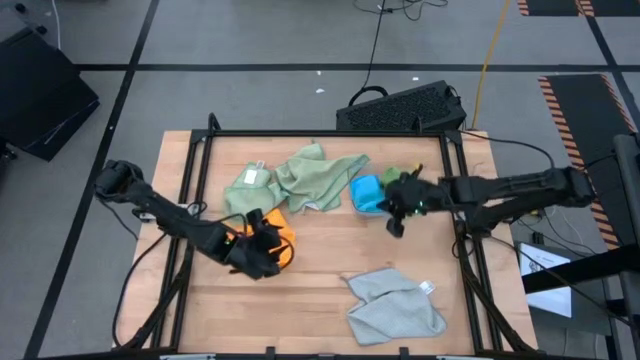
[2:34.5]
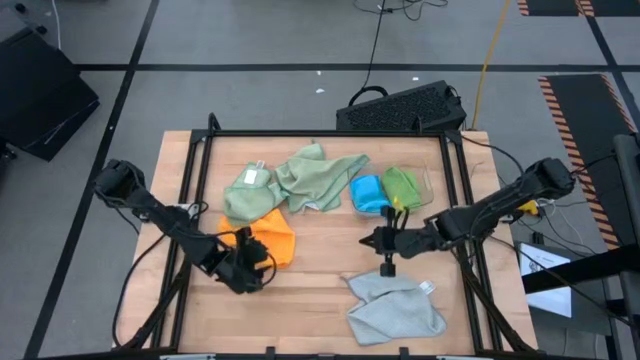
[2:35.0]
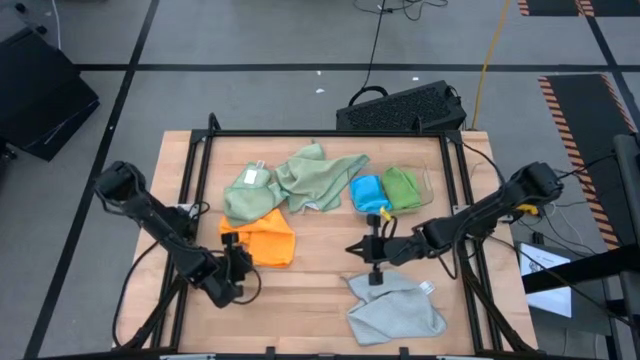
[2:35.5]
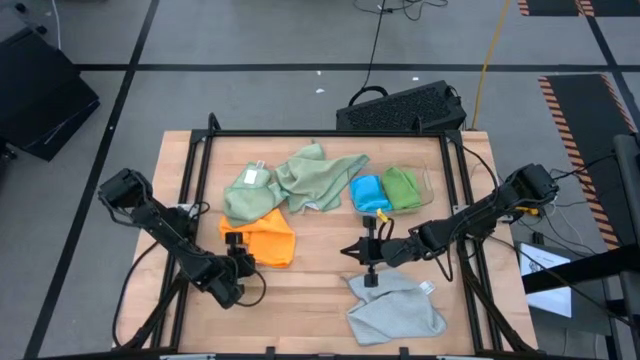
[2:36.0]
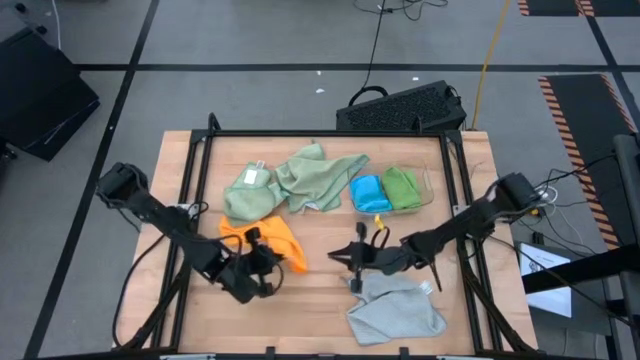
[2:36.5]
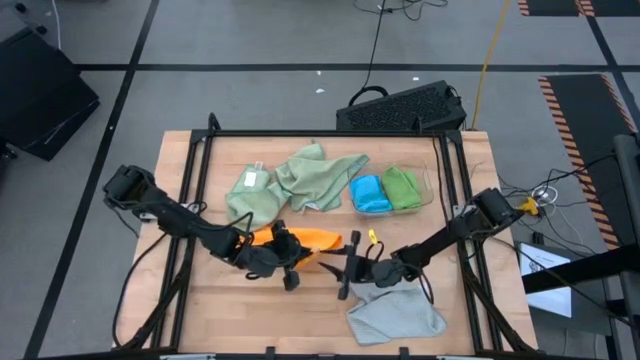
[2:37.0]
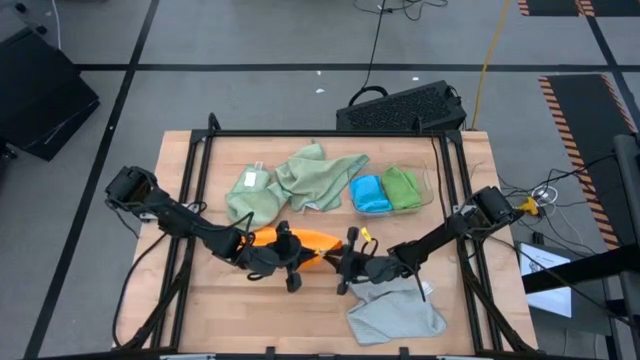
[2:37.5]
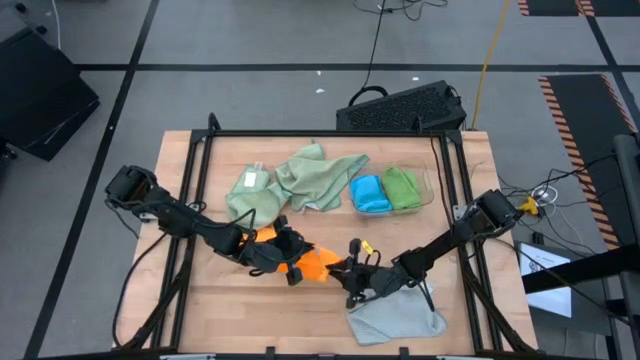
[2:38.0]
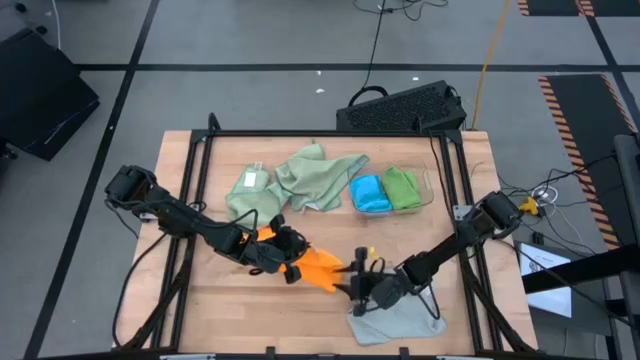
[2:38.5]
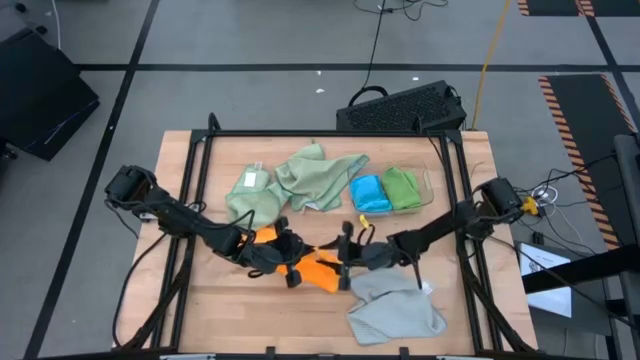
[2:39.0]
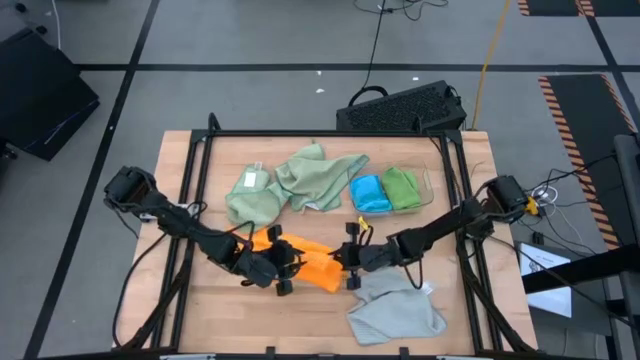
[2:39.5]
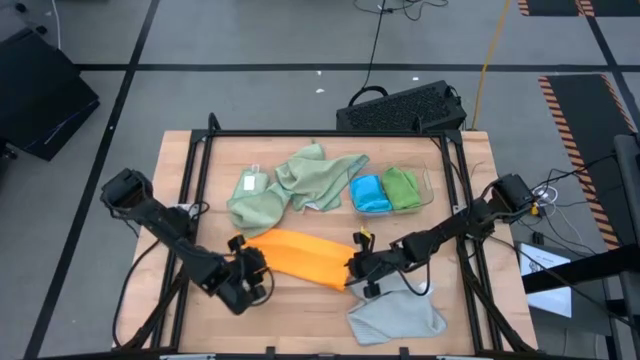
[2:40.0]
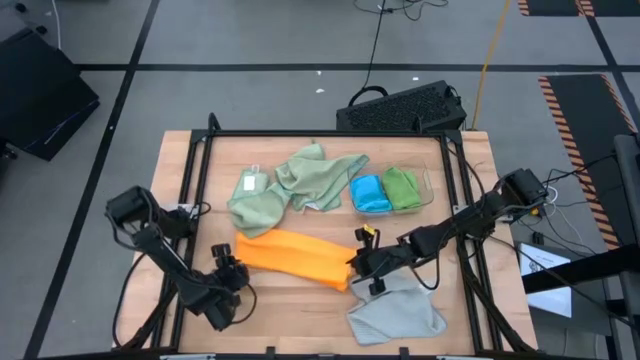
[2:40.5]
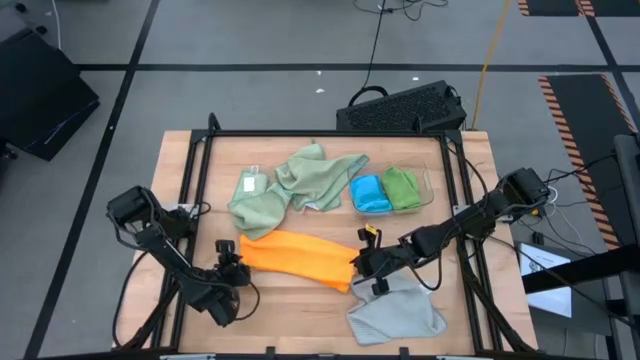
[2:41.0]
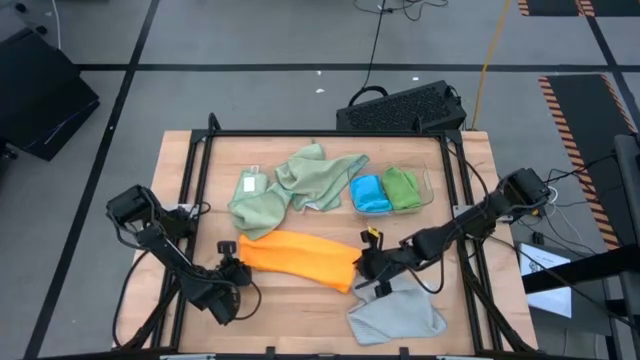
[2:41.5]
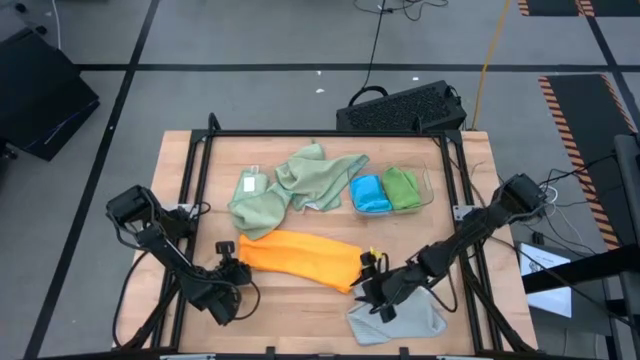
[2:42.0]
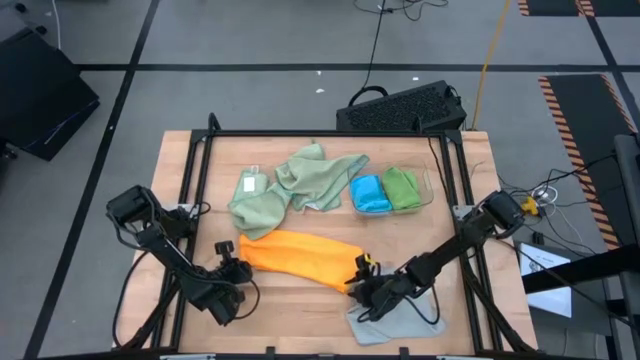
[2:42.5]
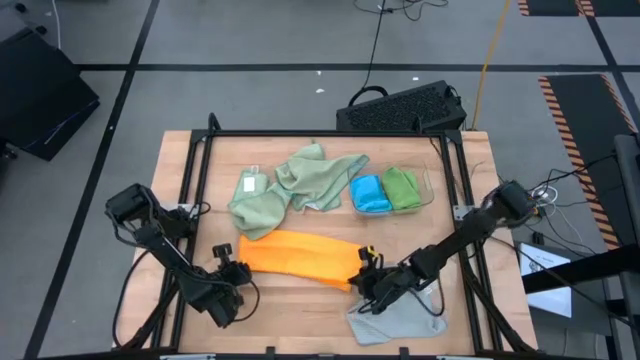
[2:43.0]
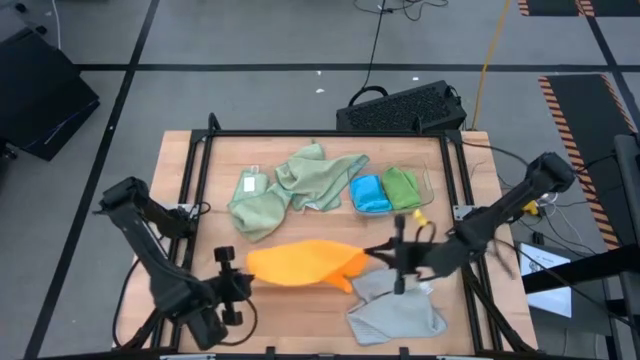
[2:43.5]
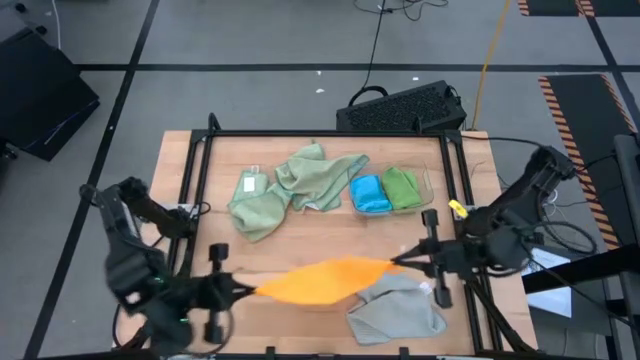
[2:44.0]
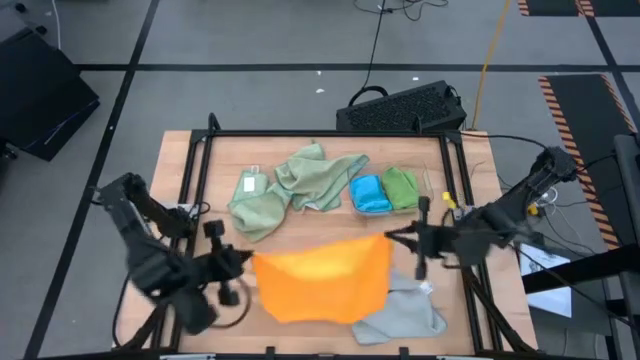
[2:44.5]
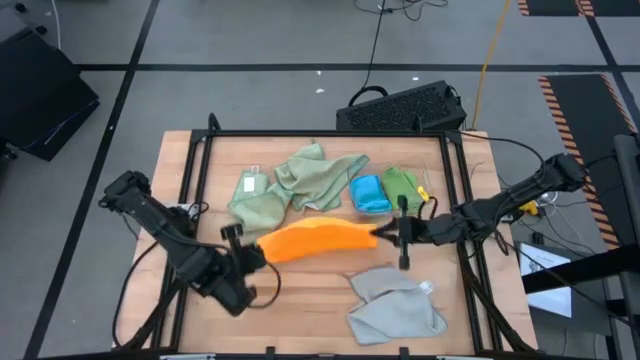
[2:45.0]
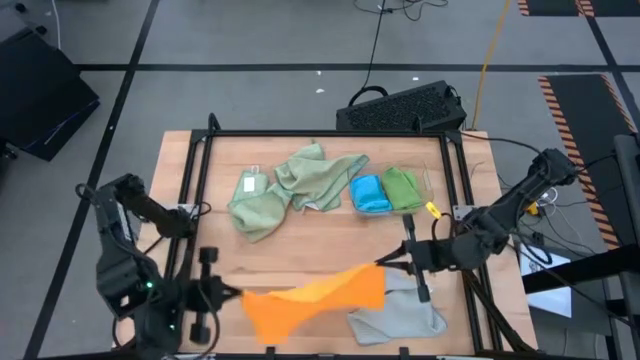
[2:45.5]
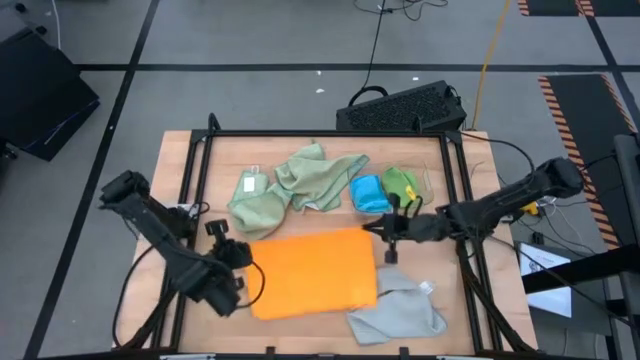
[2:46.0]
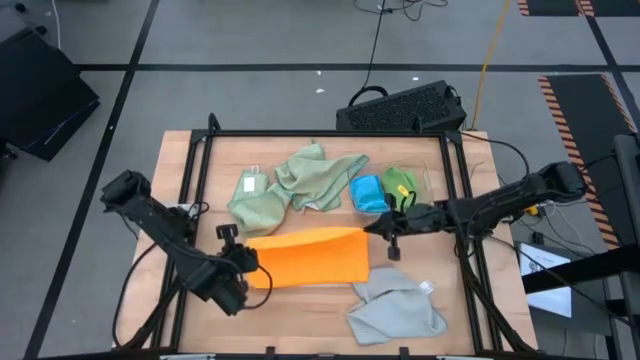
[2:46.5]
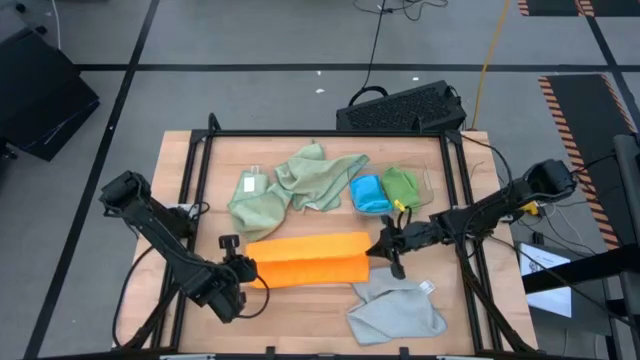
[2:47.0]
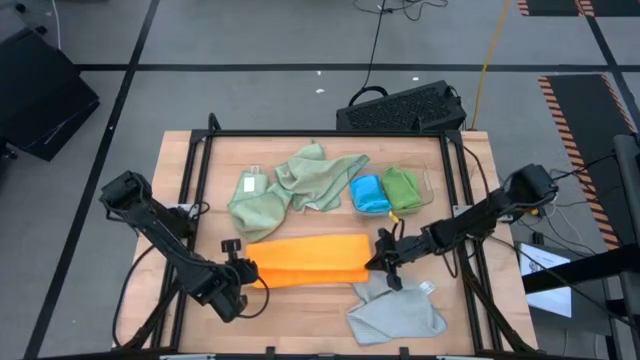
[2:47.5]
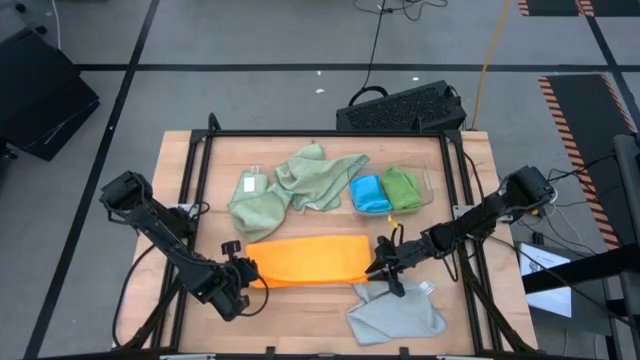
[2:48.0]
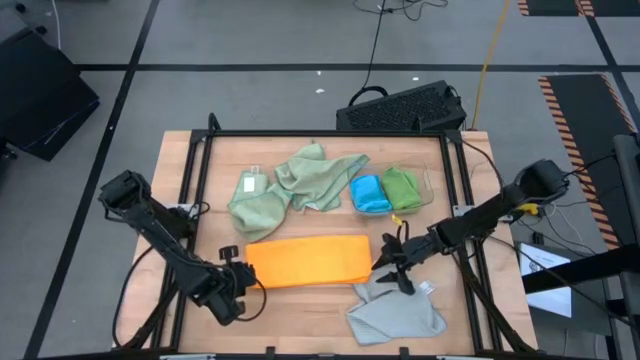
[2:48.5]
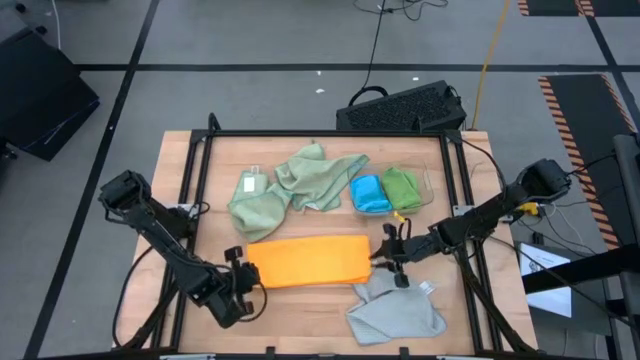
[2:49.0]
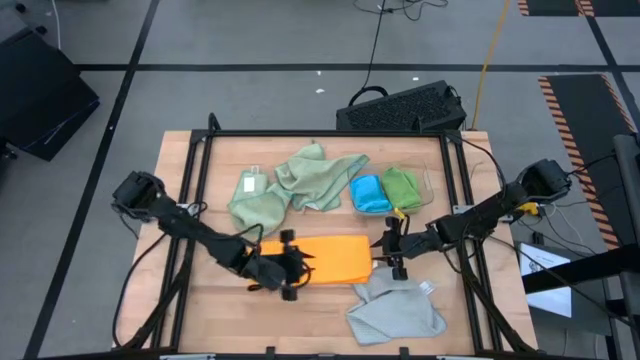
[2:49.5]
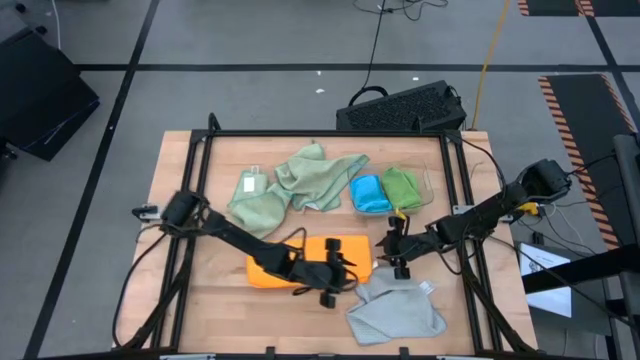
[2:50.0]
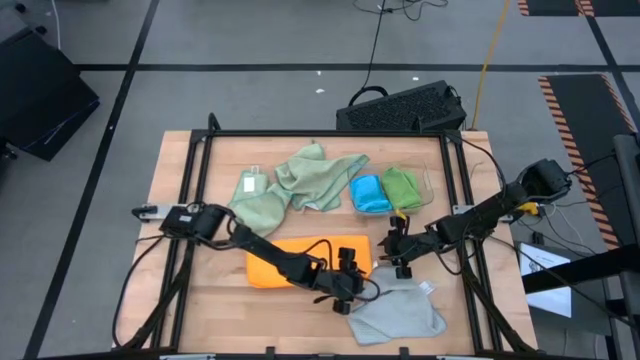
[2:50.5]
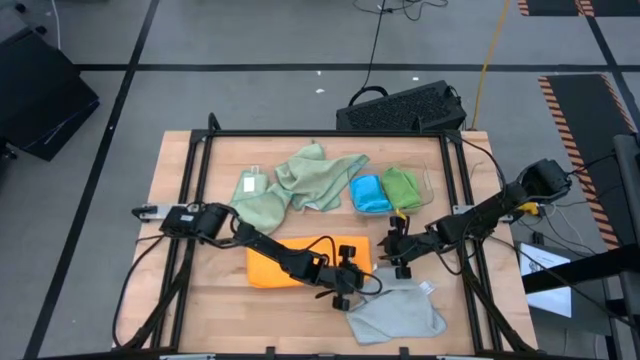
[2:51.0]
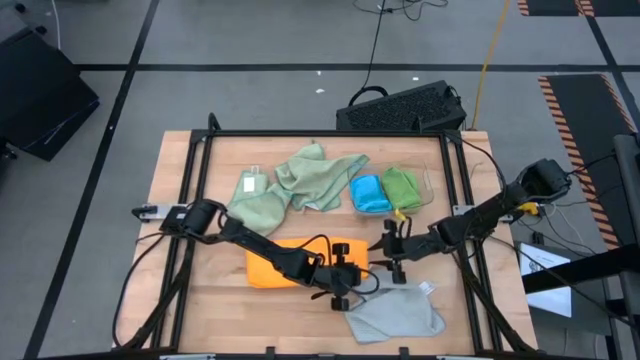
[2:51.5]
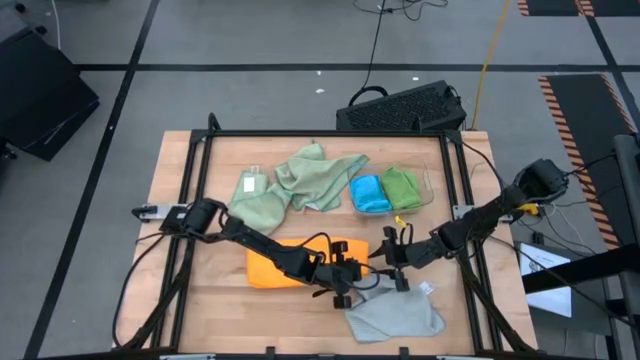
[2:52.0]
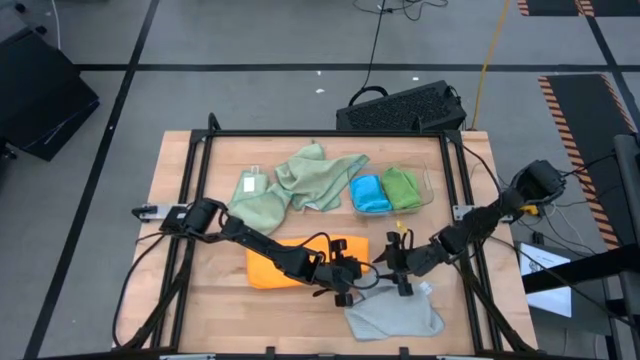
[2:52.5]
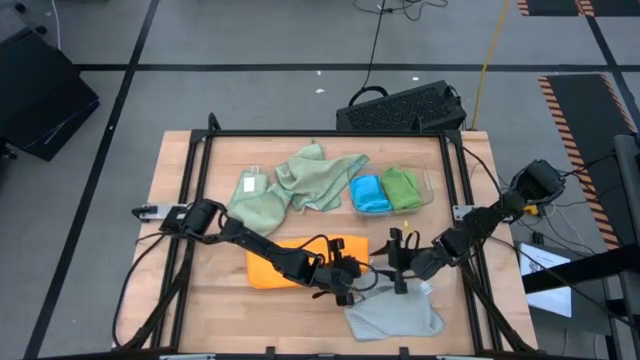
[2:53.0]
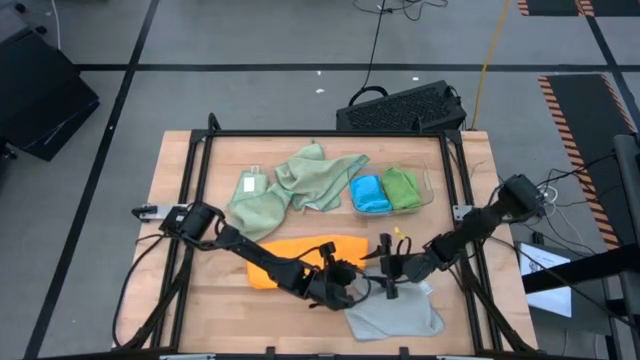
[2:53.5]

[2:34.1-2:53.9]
Task: Fold microfiber towels
Fold the yellow microfiber cloth

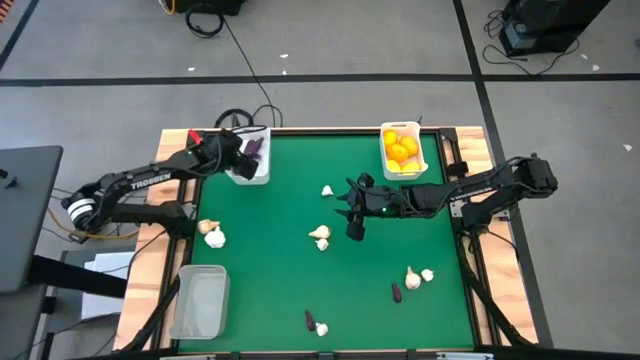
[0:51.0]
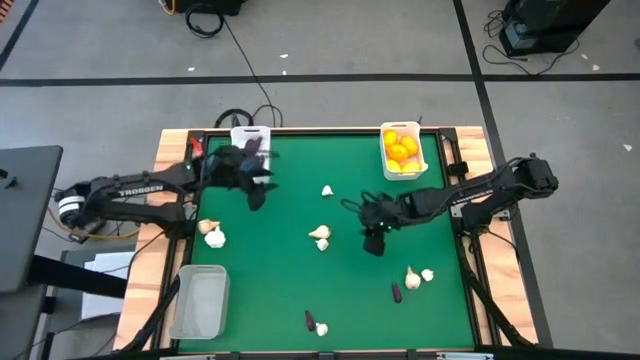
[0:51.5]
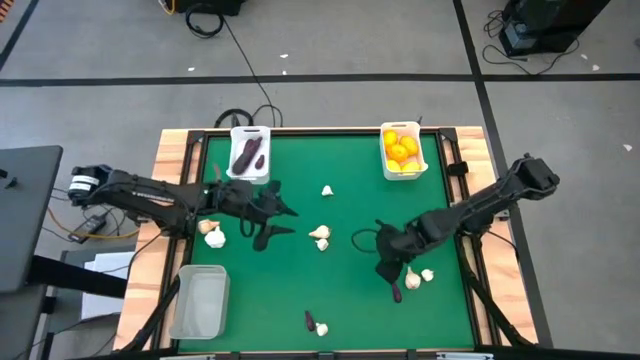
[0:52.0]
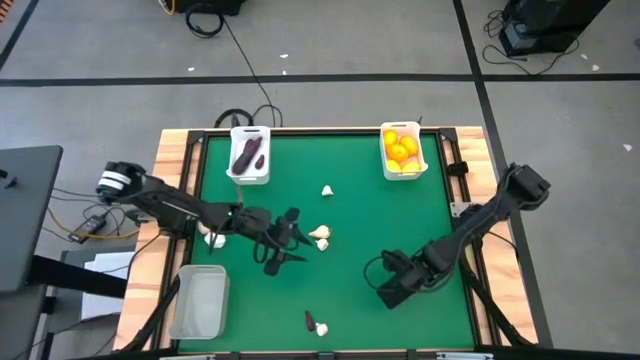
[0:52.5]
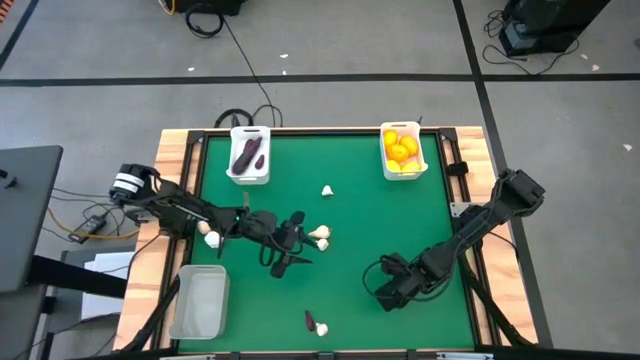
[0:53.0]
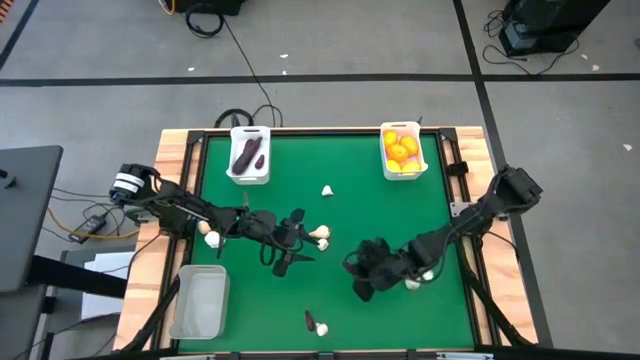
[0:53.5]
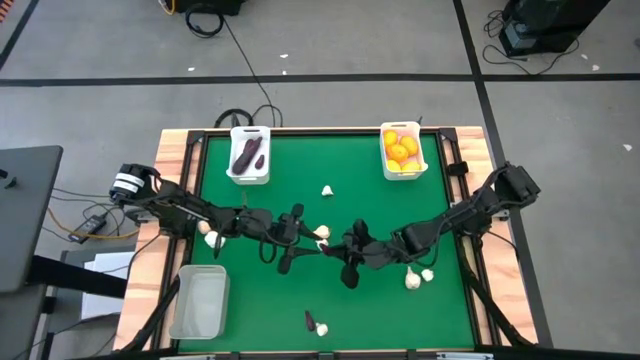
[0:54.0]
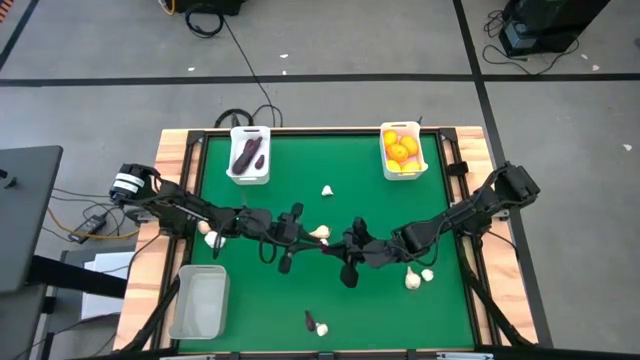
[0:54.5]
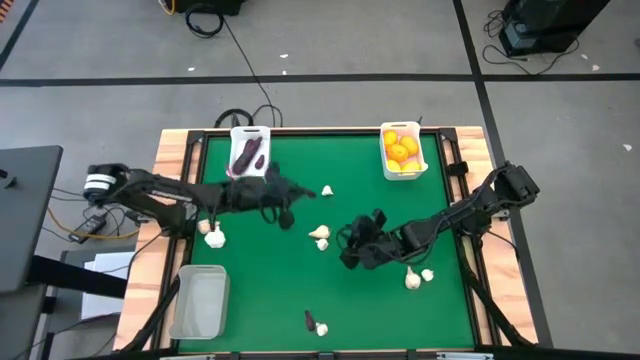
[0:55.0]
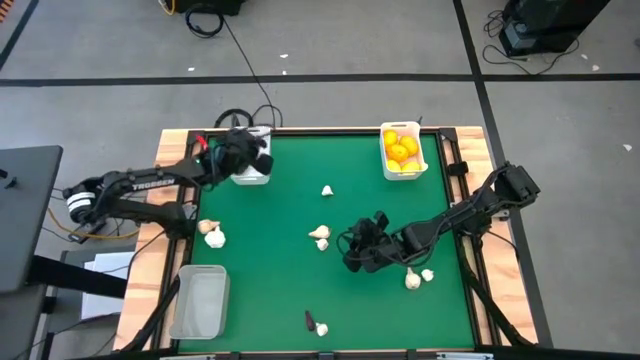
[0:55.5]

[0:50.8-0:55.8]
Task: Sort produce into baskets
Put the right eggplant into the left white bin
